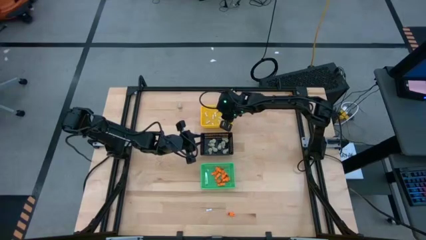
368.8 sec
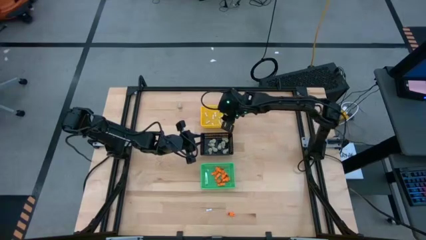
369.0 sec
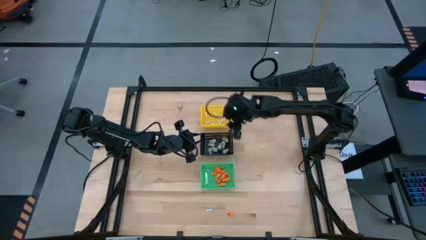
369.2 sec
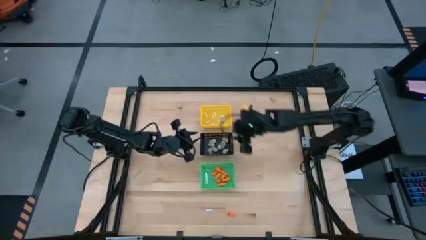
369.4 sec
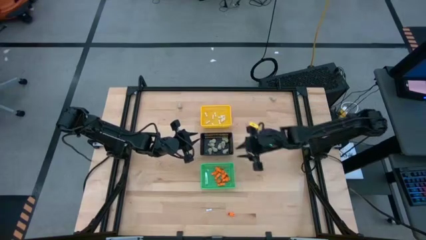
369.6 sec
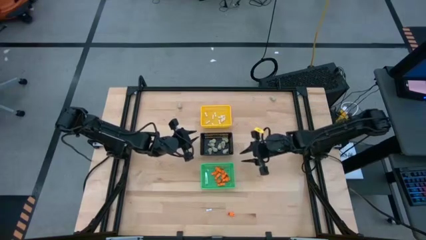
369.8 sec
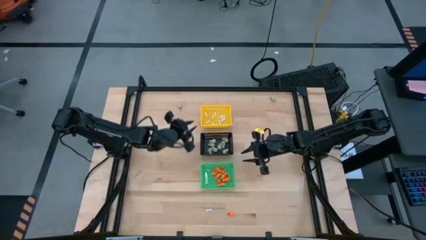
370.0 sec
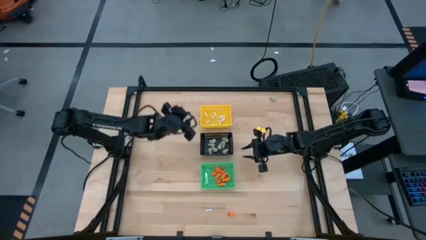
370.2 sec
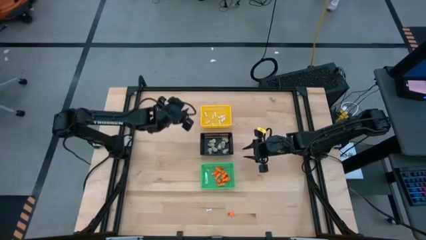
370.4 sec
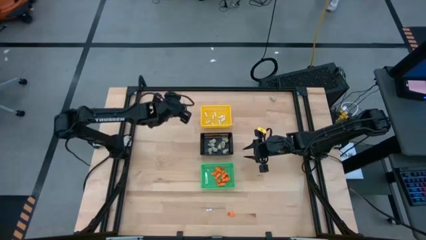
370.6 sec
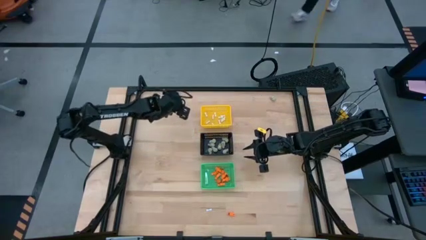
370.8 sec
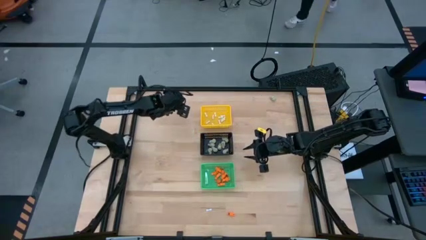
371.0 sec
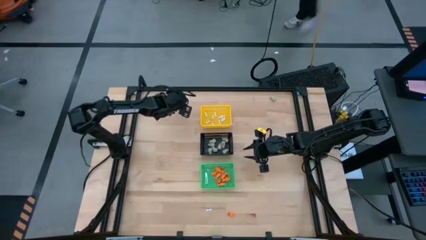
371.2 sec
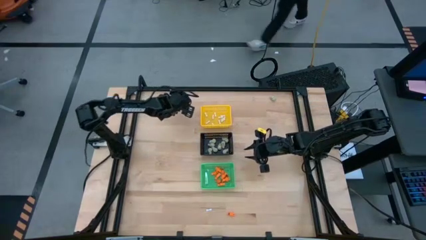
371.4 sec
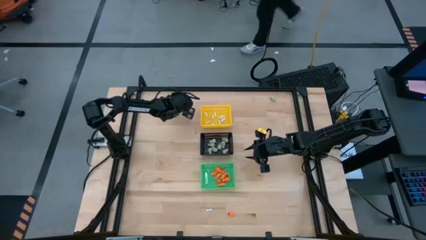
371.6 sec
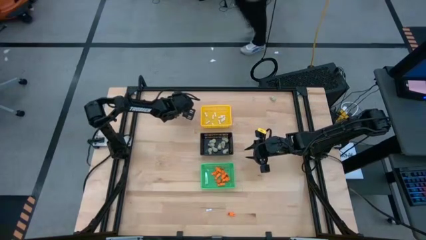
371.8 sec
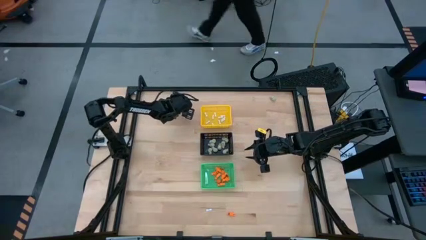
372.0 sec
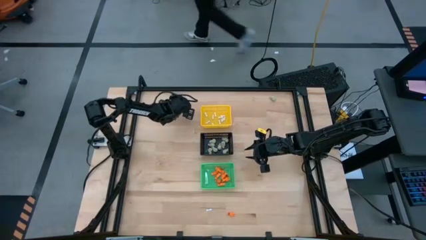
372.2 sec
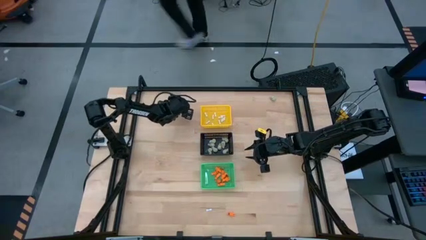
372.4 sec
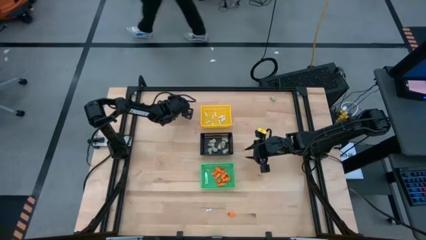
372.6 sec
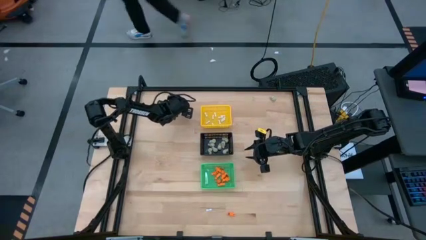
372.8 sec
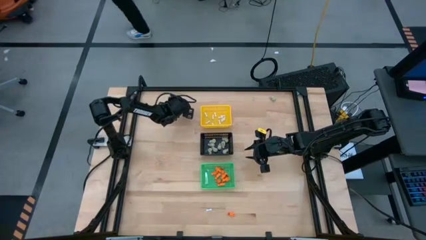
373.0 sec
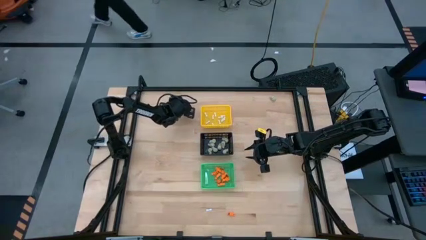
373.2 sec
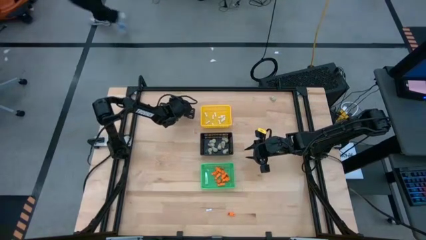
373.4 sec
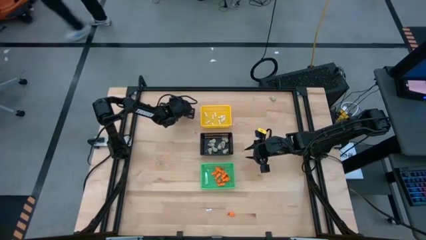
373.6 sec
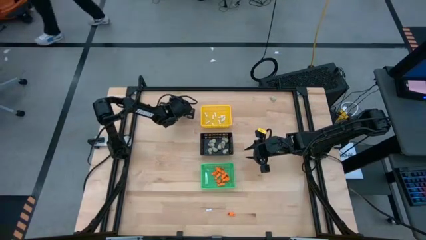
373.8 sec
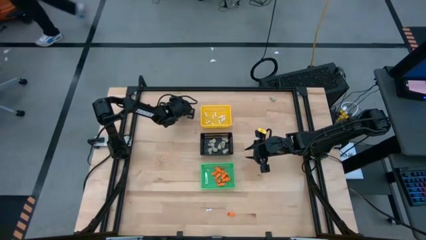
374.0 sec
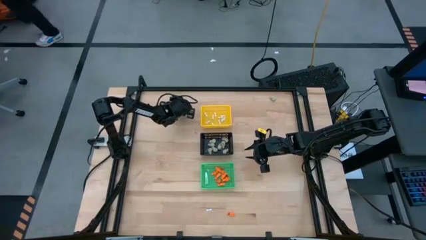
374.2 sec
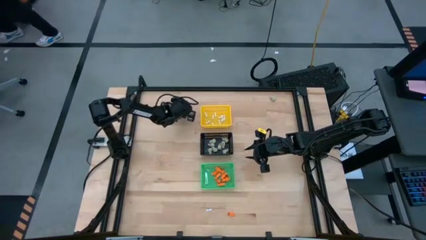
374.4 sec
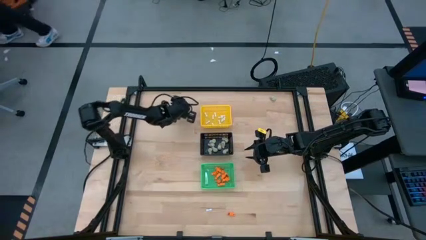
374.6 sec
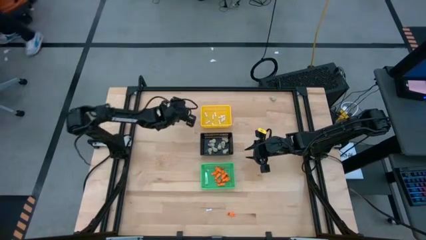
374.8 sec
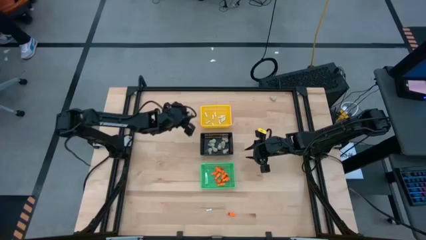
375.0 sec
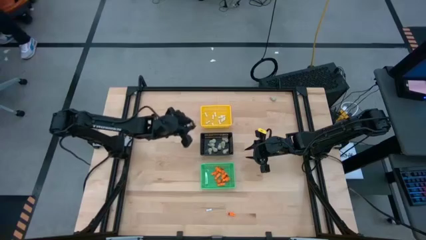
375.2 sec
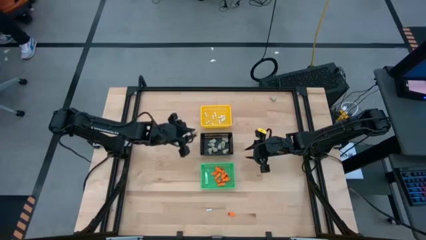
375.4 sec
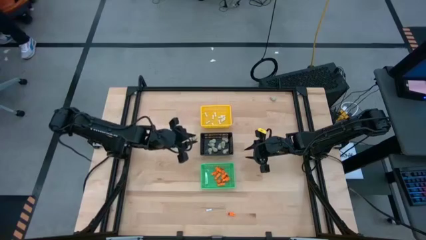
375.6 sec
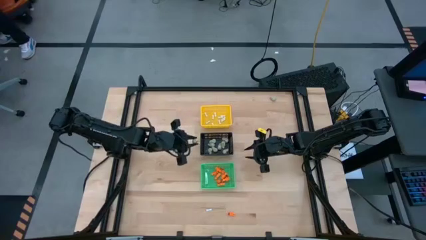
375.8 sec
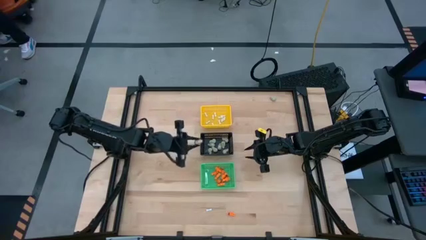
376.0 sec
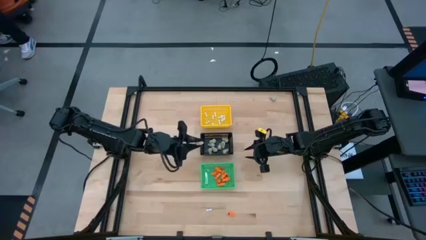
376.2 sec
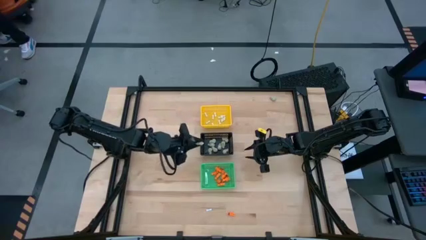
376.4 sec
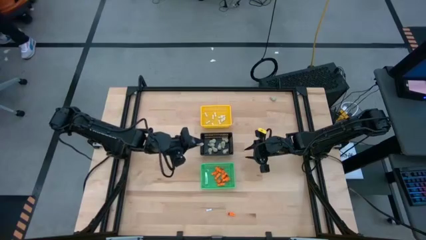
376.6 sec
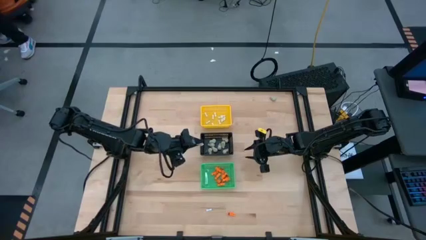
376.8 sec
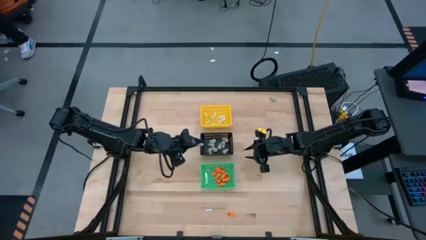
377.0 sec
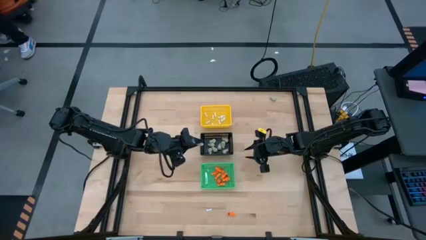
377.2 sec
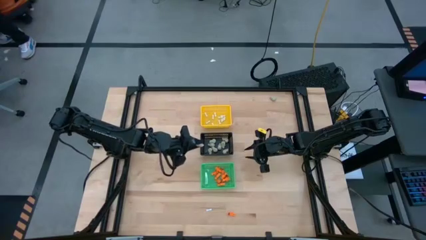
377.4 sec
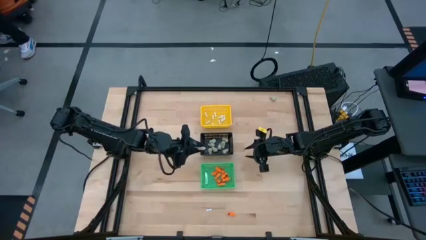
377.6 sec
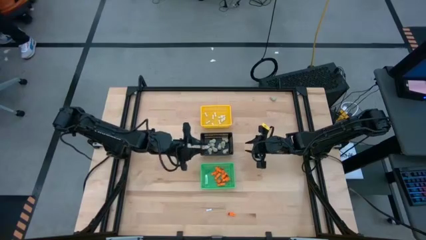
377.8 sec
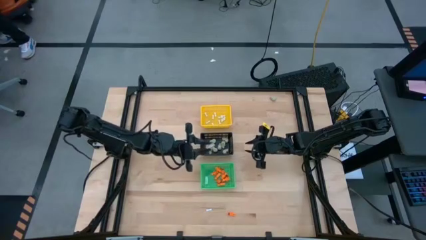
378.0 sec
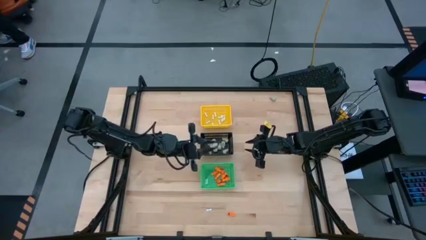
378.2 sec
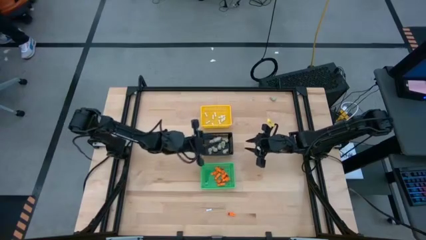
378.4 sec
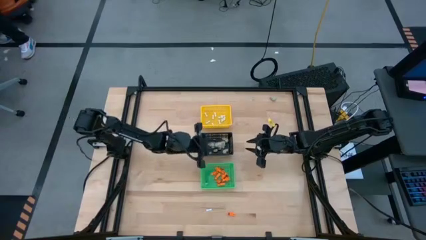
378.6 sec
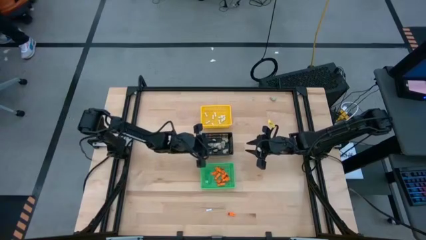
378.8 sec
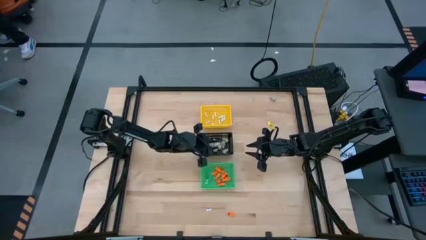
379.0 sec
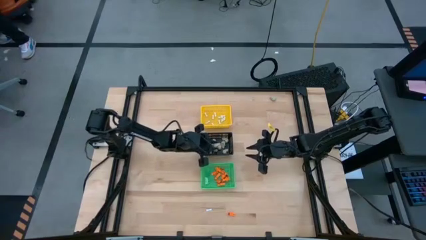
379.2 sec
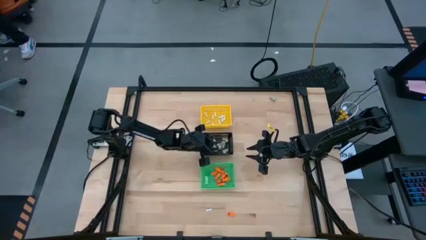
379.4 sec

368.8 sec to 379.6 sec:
Task: Sort Halloween decoration
Put the gray skull toy into the black basket

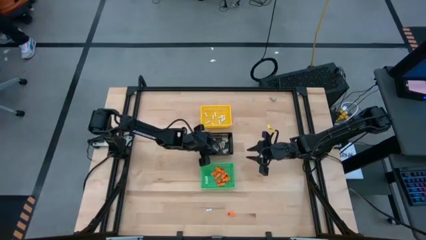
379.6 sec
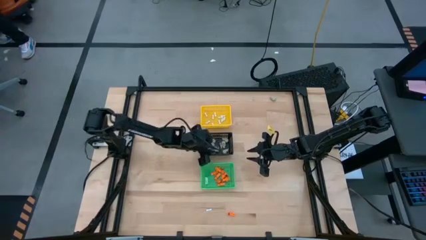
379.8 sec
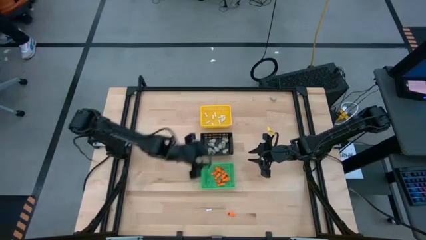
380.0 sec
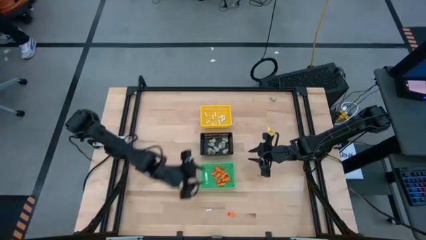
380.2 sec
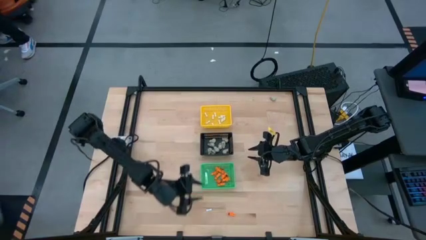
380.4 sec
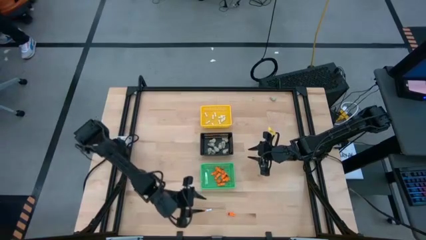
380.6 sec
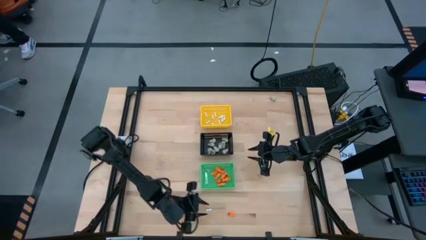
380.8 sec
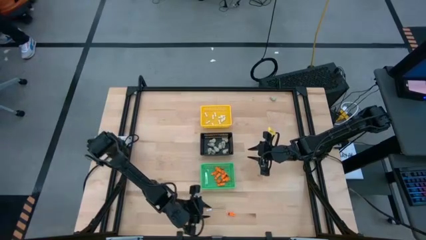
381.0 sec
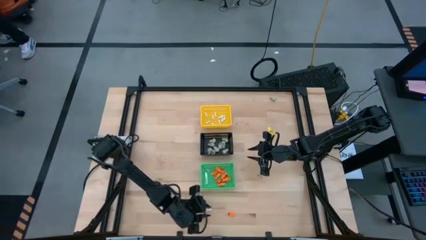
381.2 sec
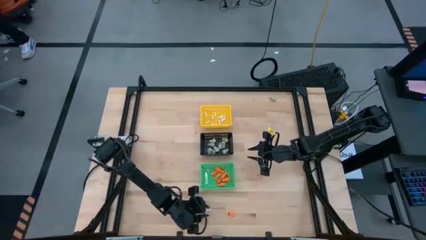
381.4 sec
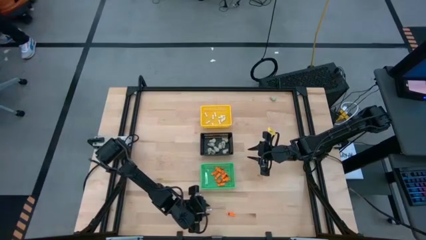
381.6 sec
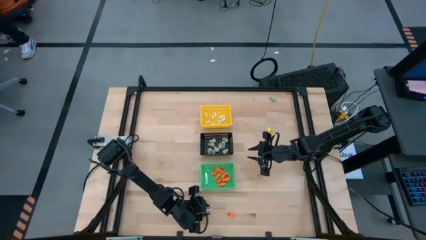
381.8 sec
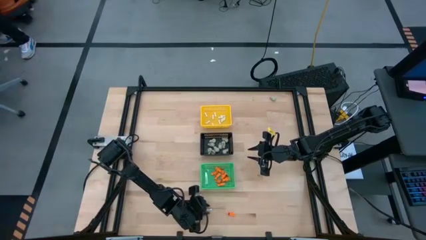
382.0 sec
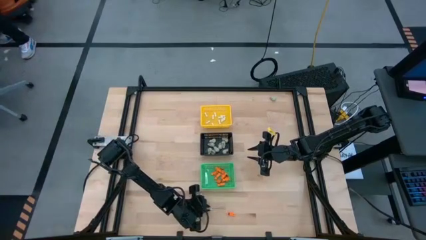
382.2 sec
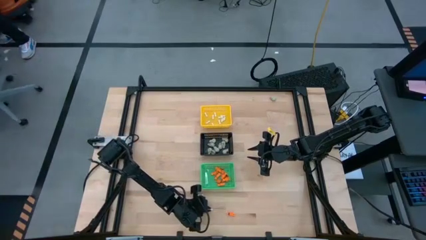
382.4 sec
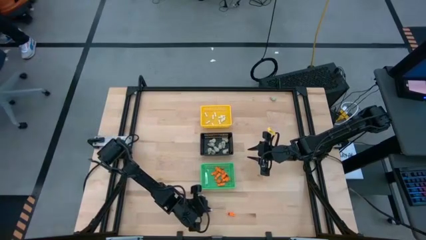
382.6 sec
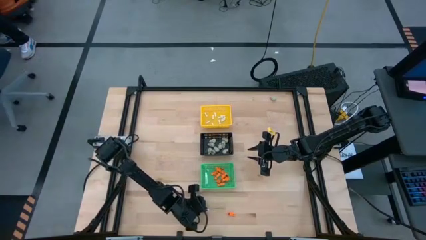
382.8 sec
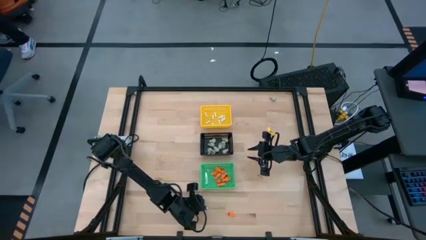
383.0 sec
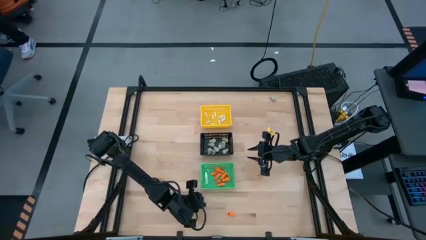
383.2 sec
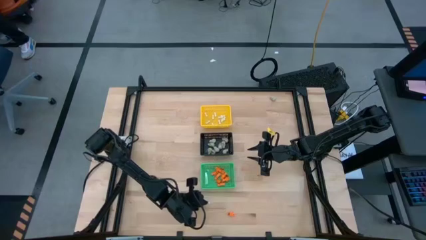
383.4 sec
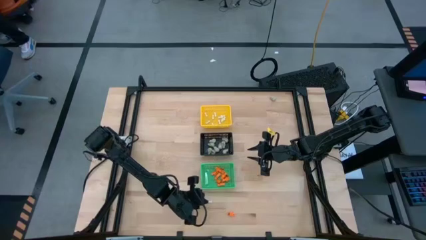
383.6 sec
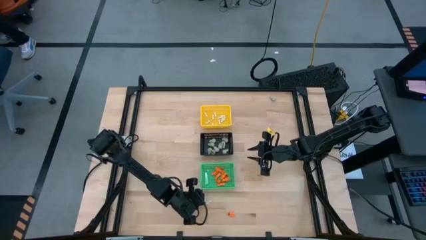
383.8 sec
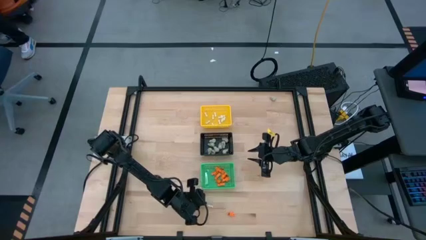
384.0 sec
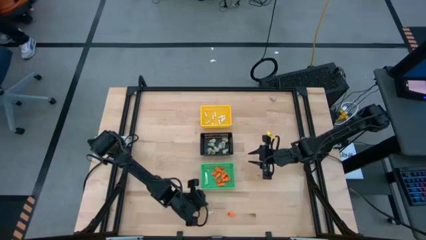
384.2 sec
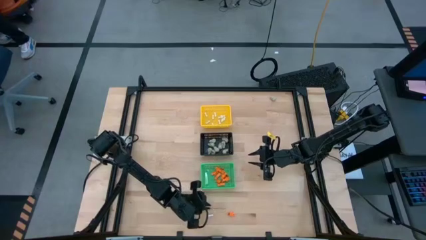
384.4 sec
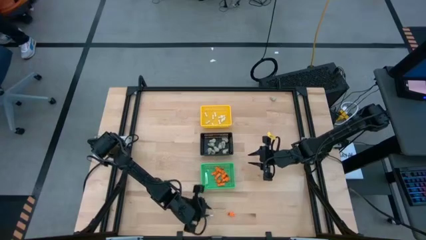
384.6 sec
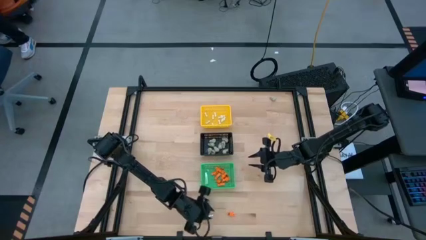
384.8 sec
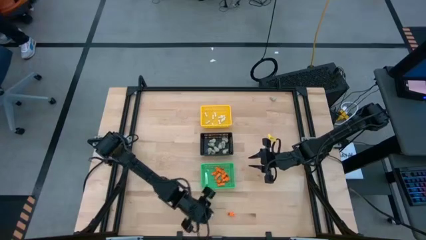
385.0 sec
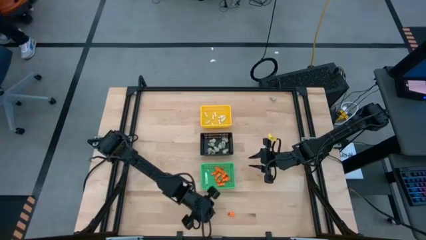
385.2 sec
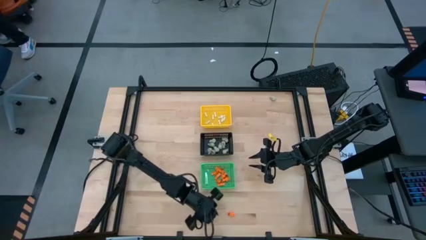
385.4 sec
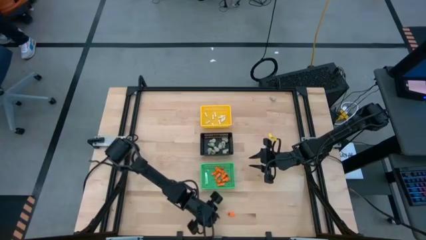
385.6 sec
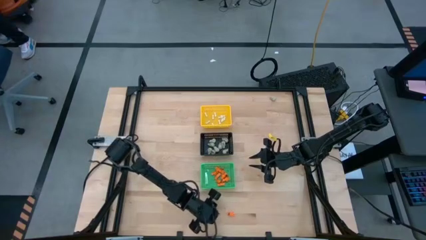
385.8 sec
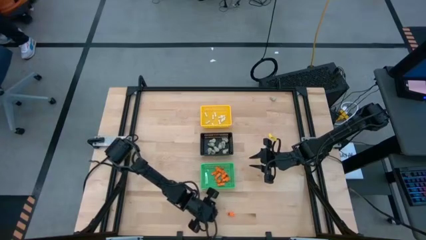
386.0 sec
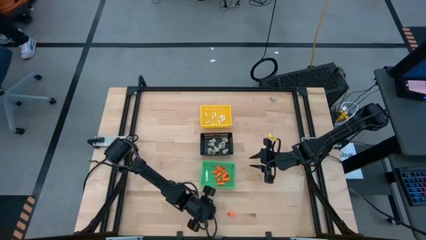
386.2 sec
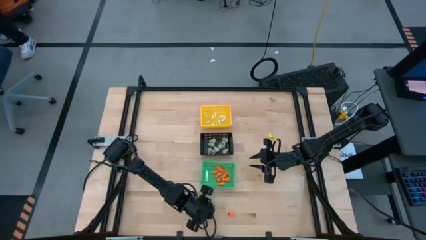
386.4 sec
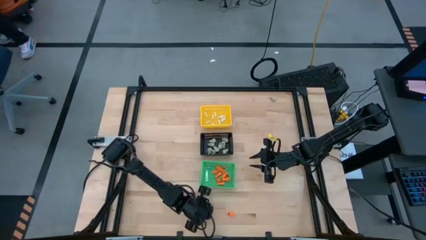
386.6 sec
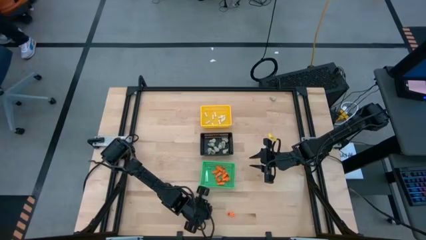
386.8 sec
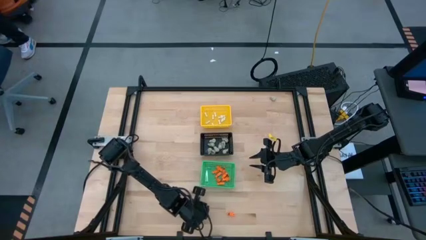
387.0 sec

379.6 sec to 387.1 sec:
Put the white bone toy into the yellow basket
